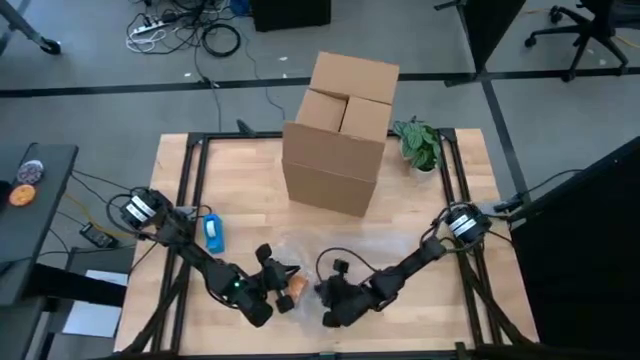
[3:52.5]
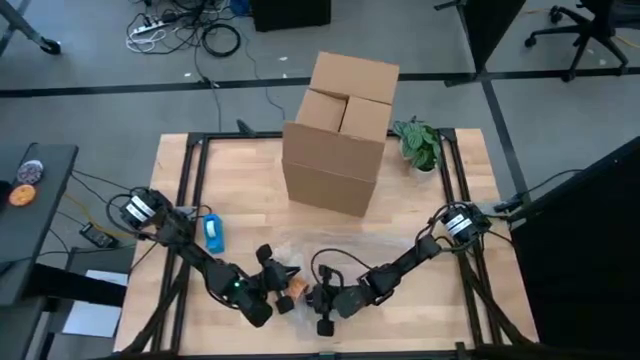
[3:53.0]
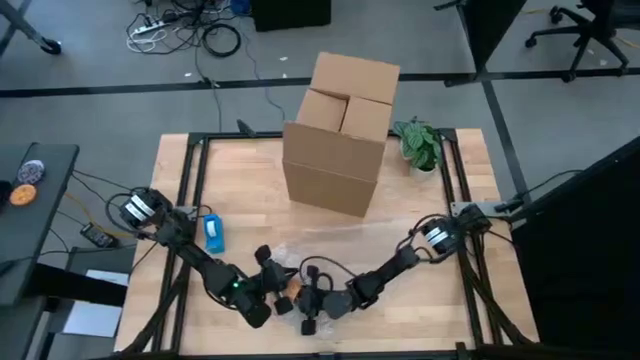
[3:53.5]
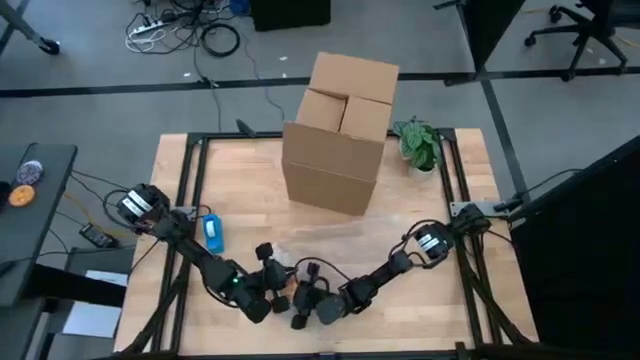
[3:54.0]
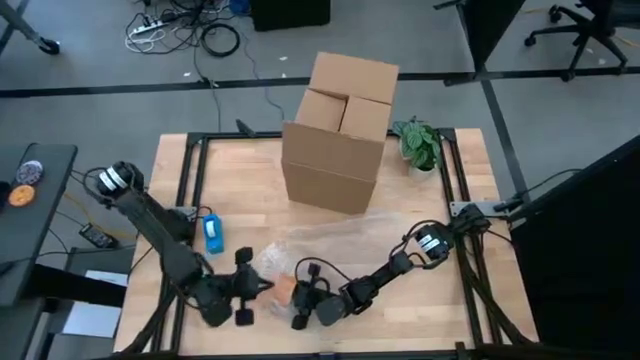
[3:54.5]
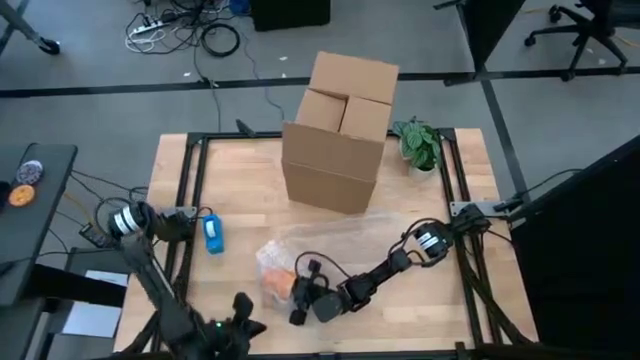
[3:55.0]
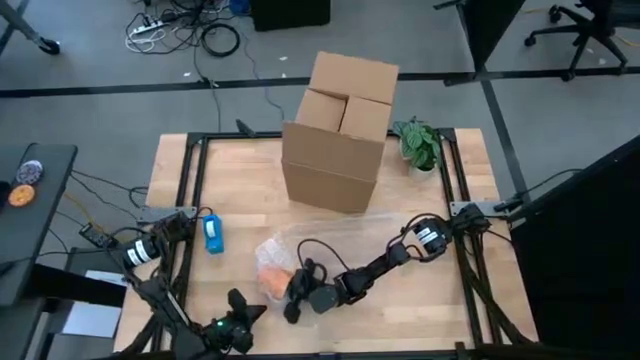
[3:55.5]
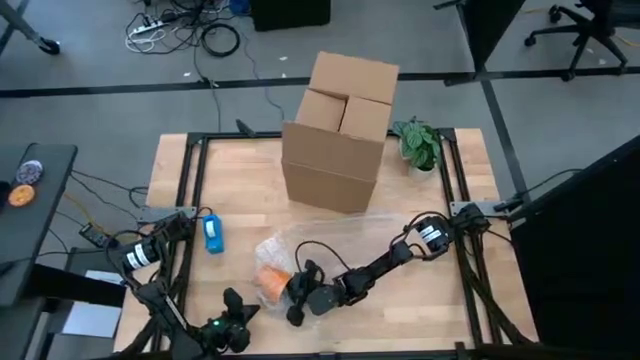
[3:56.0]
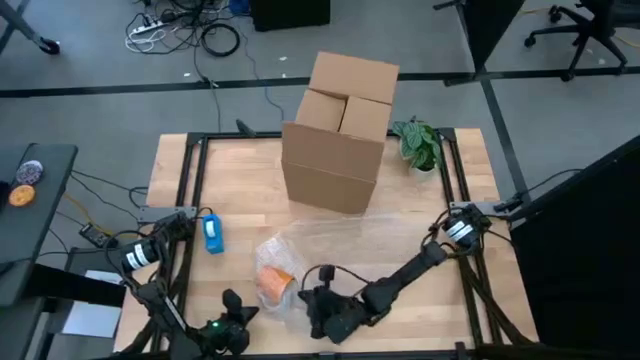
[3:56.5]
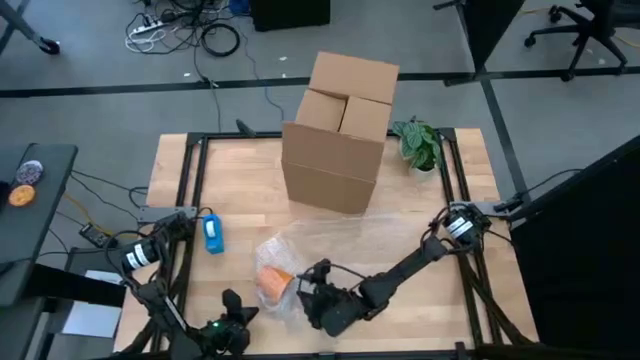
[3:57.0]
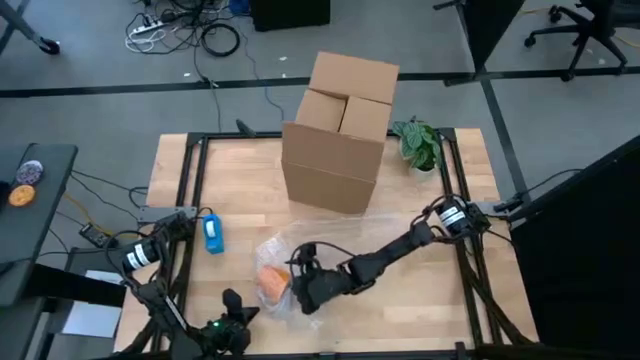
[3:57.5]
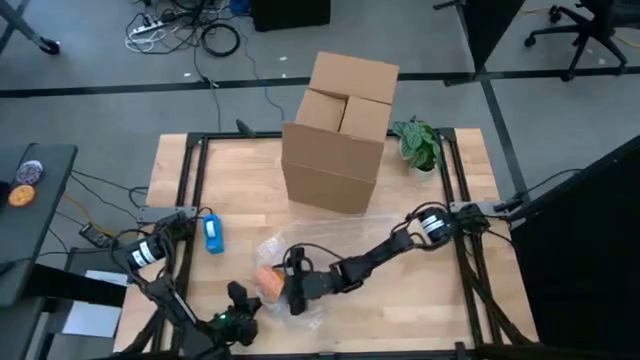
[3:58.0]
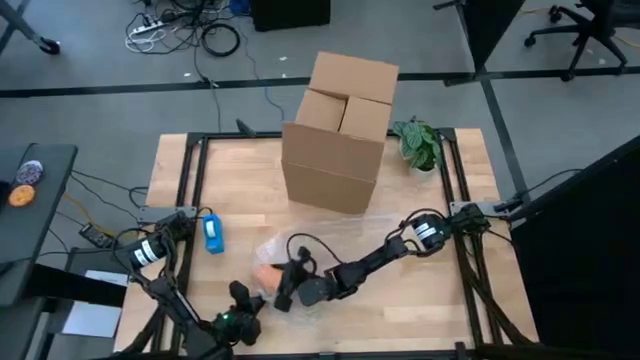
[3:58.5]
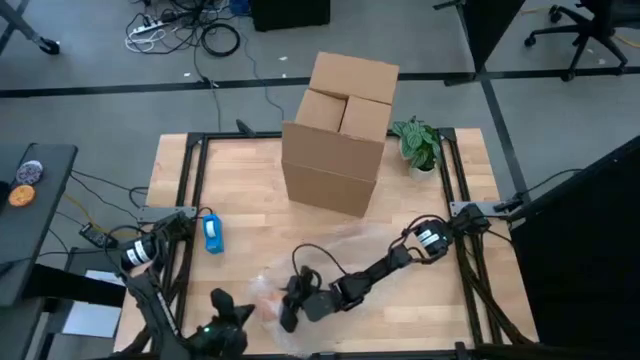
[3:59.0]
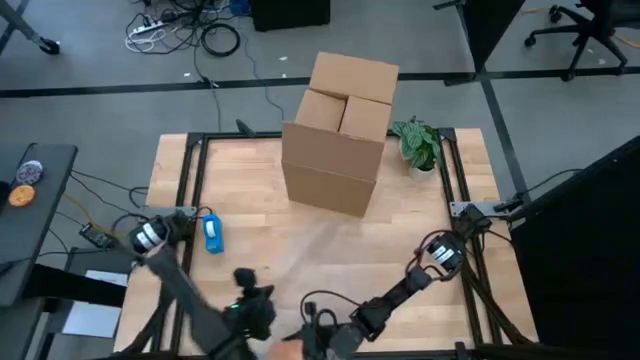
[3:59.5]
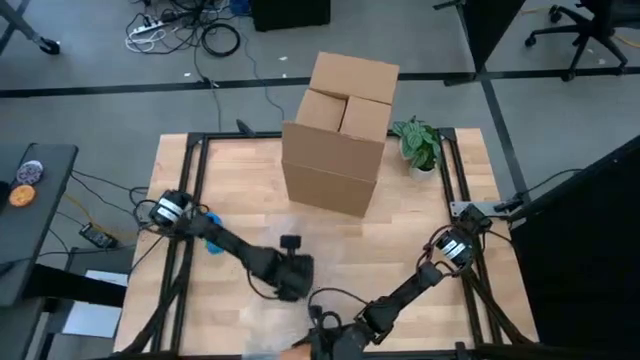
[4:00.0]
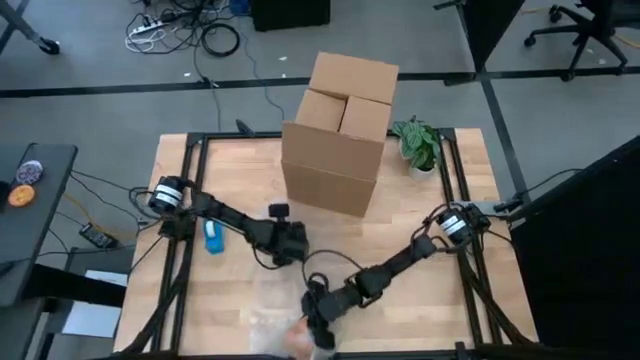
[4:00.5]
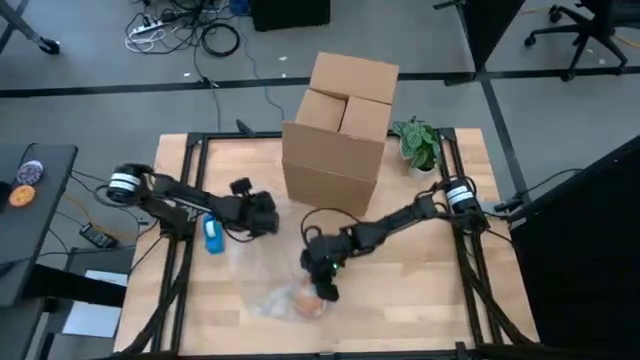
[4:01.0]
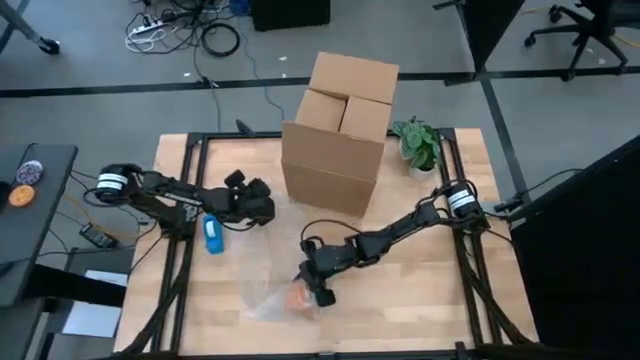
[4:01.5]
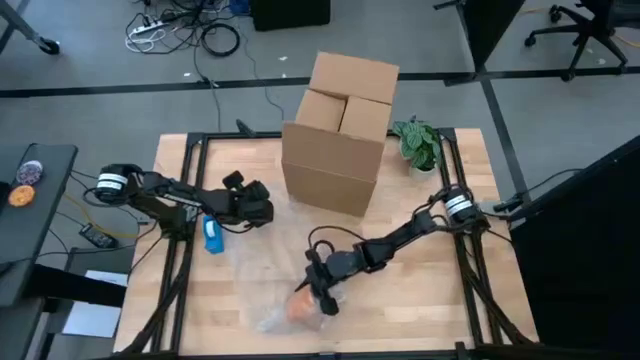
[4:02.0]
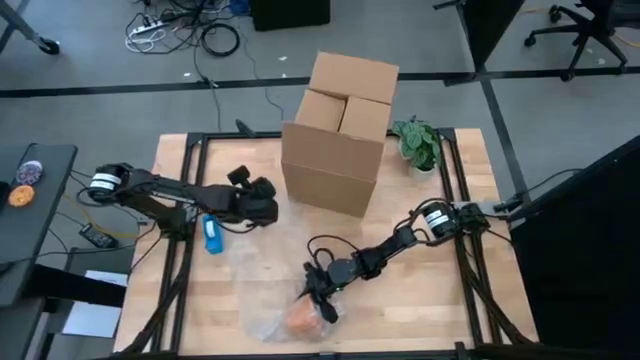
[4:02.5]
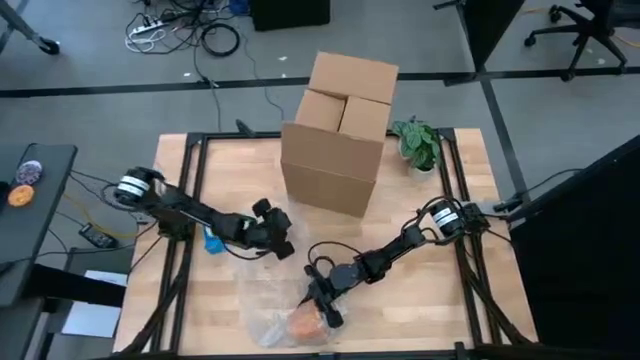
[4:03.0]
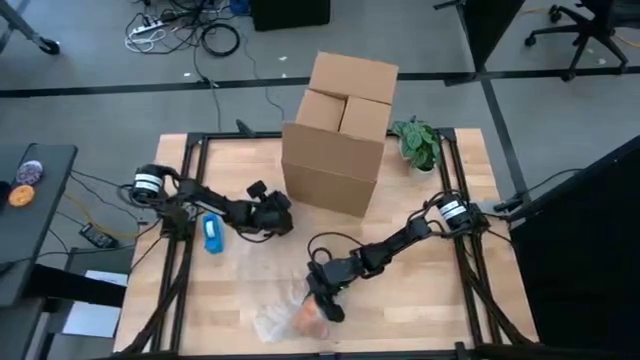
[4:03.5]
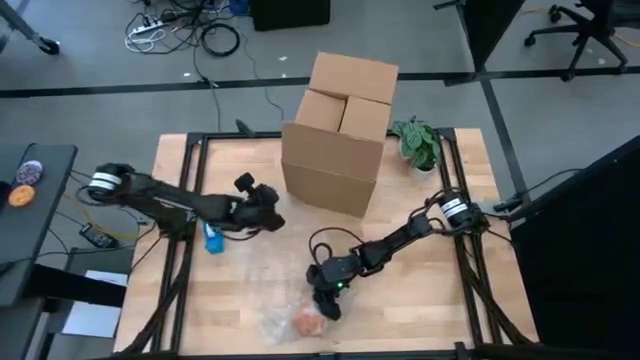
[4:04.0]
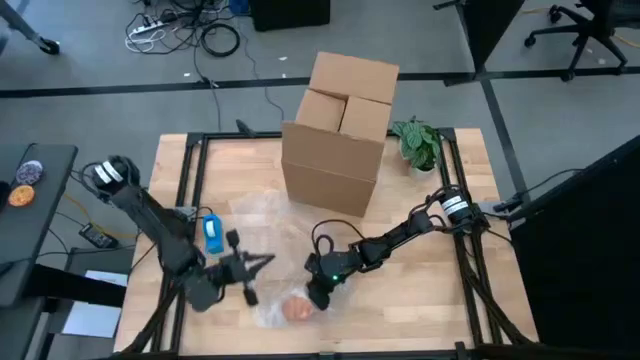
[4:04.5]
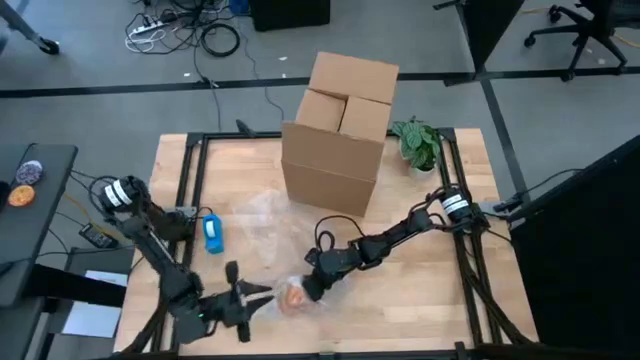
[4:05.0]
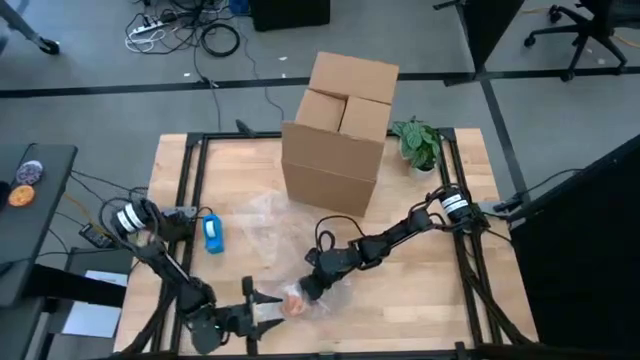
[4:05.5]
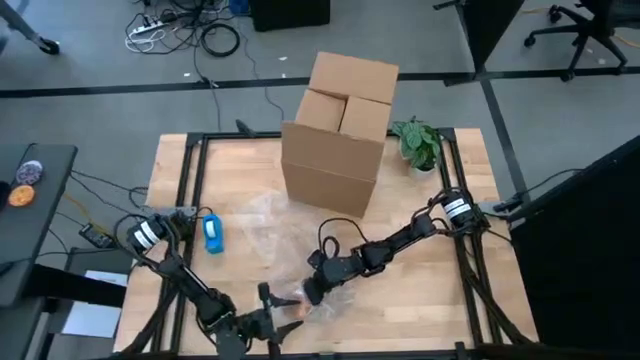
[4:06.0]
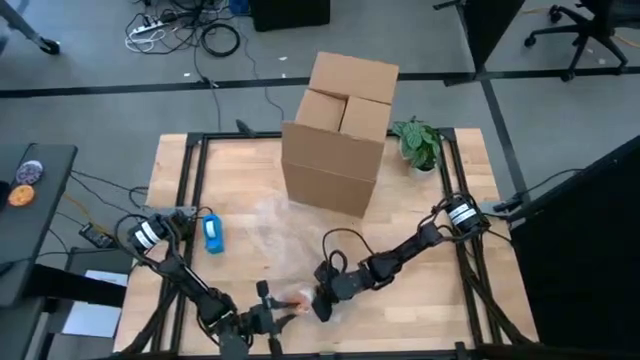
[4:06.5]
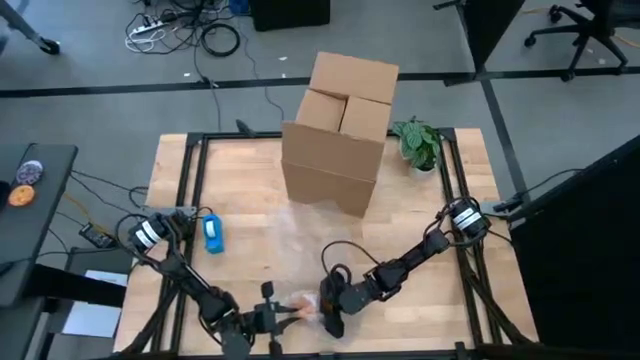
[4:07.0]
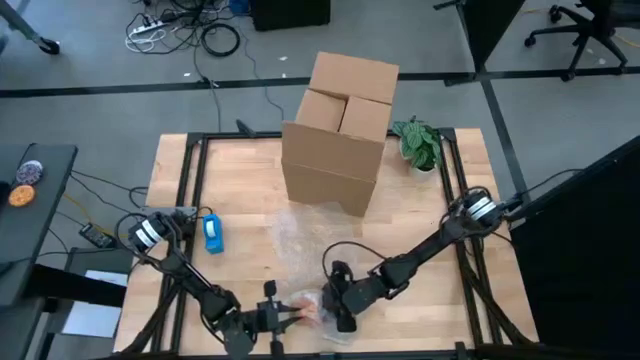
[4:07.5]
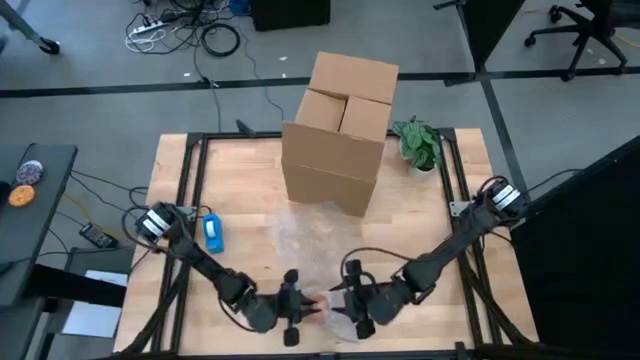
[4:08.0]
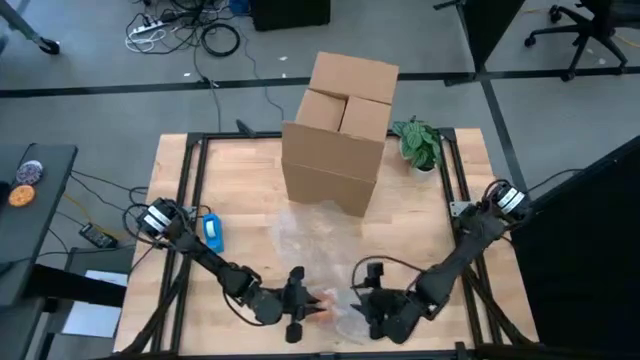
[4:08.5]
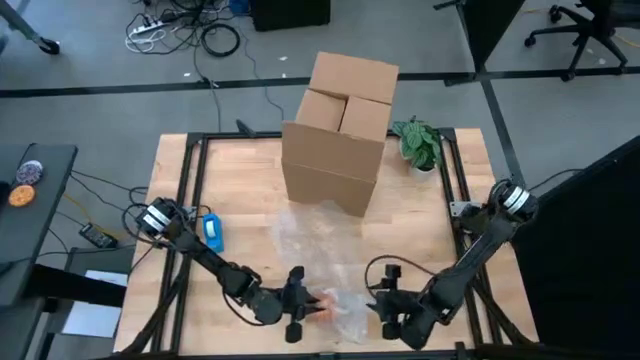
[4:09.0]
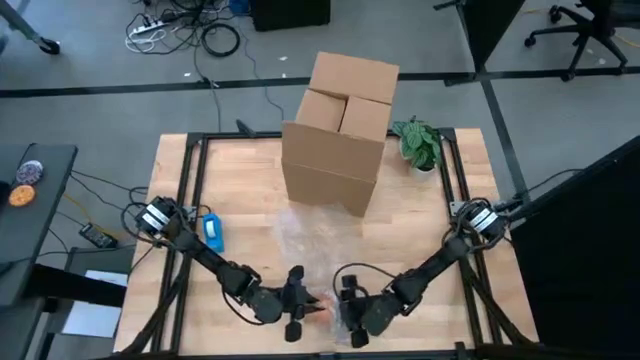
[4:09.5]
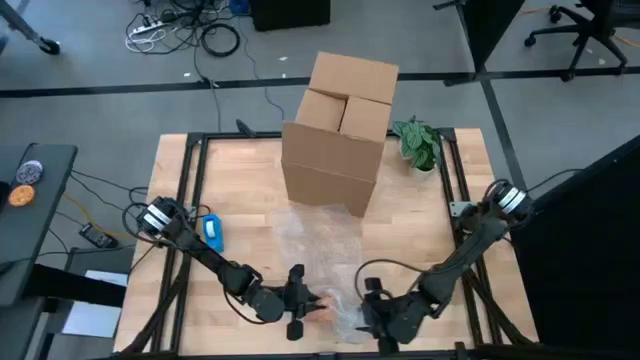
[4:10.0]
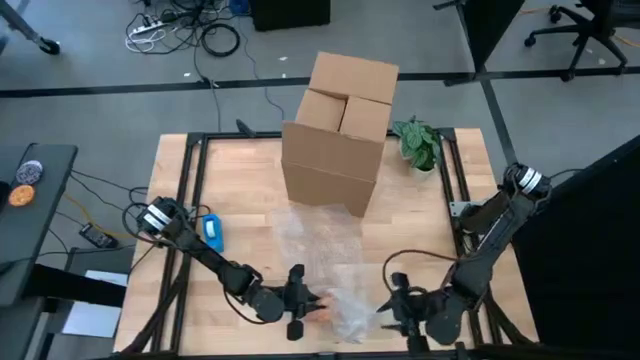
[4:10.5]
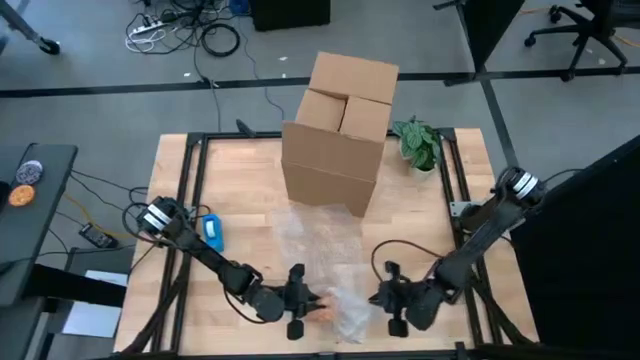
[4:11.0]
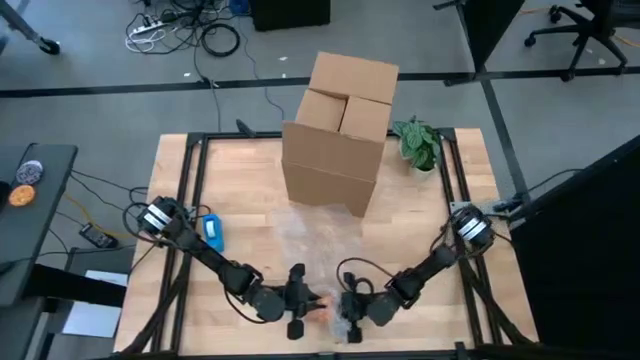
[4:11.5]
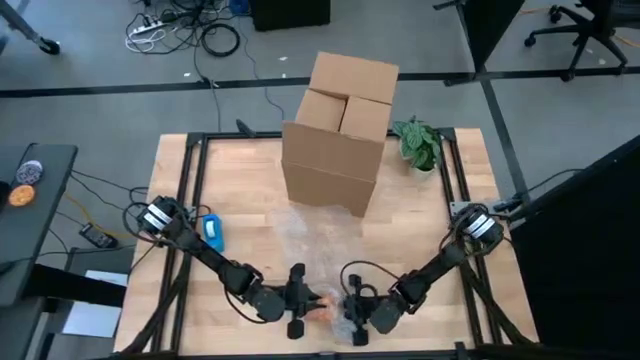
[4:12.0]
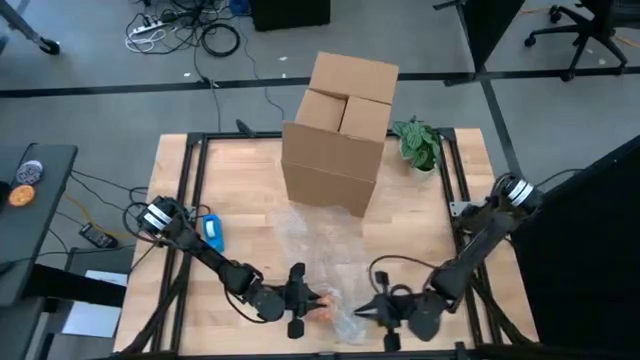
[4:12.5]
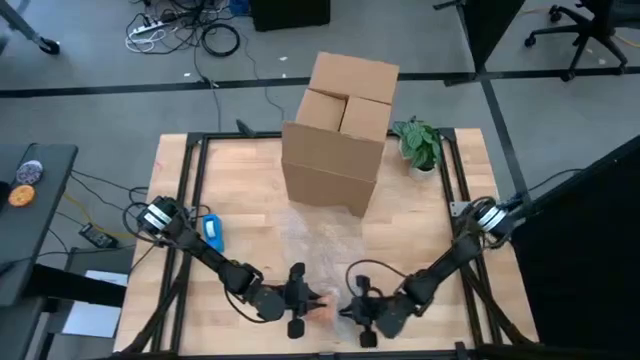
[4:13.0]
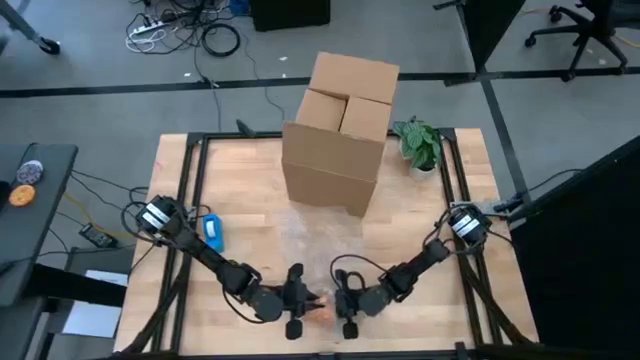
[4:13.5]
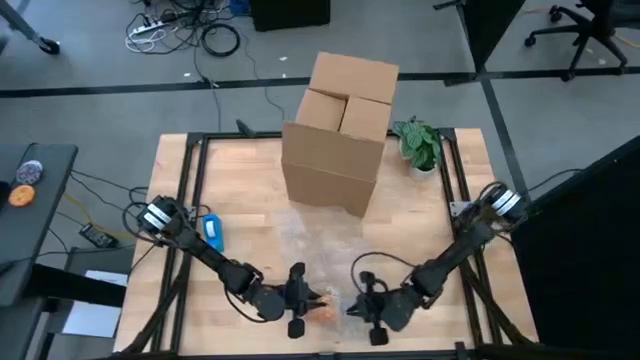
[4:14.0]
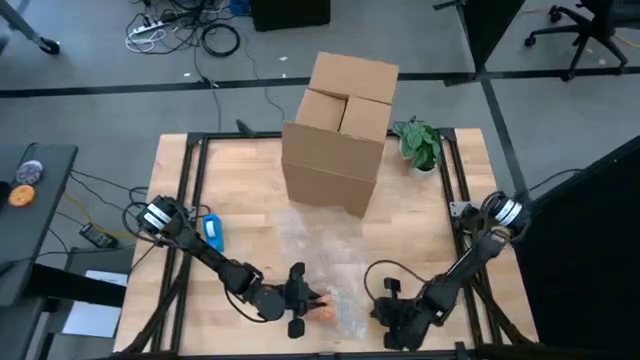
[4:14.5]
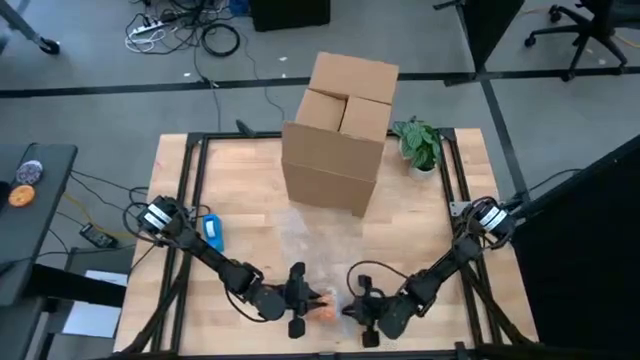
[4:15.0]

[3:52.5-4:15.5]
Task: wrap mug
Wrap the orange mug using the transparent bubble wrap
